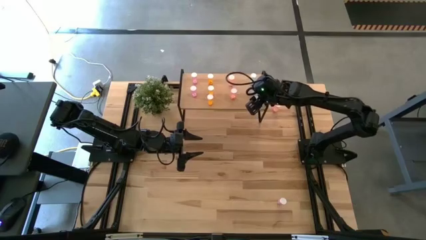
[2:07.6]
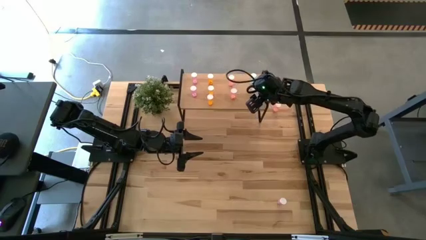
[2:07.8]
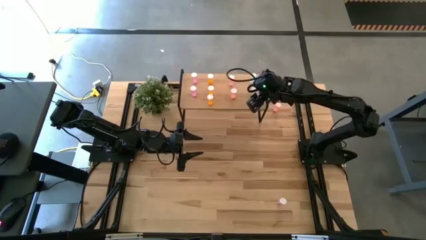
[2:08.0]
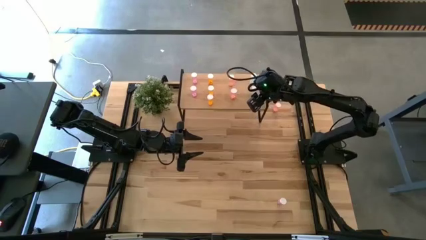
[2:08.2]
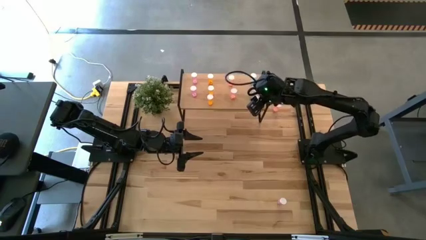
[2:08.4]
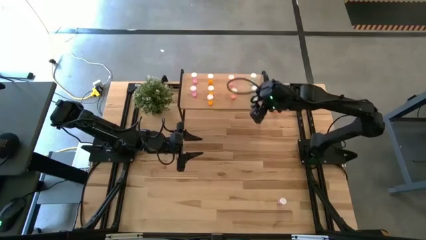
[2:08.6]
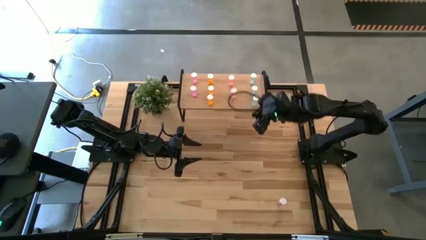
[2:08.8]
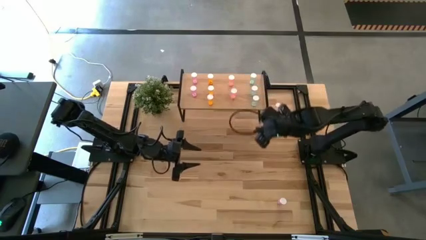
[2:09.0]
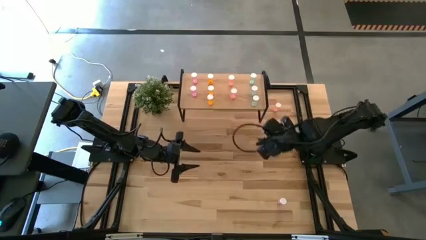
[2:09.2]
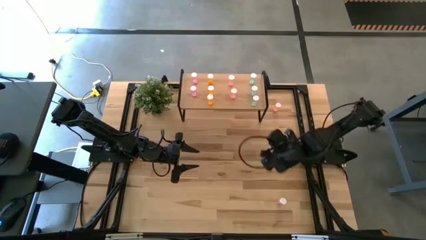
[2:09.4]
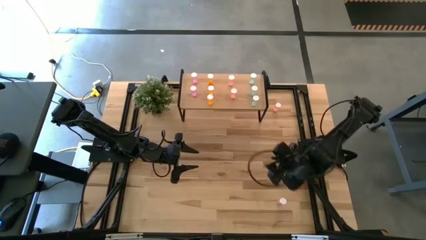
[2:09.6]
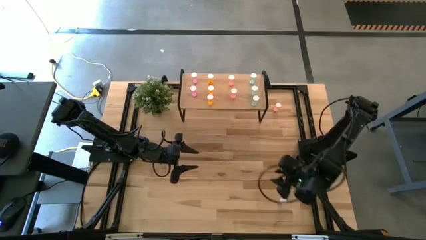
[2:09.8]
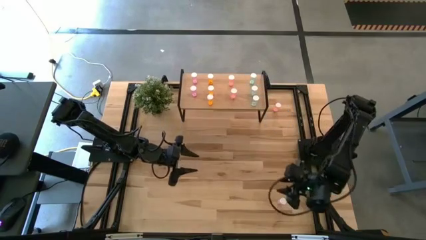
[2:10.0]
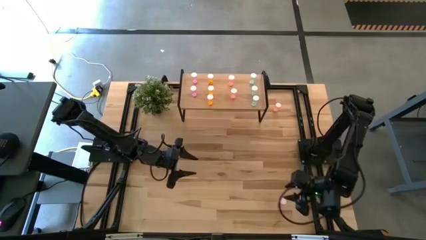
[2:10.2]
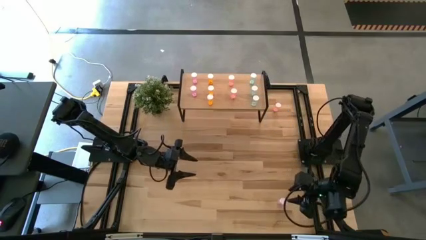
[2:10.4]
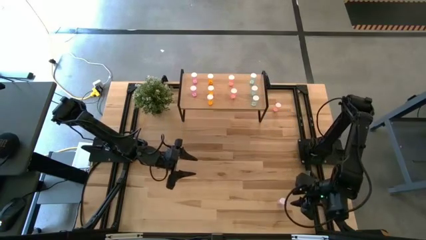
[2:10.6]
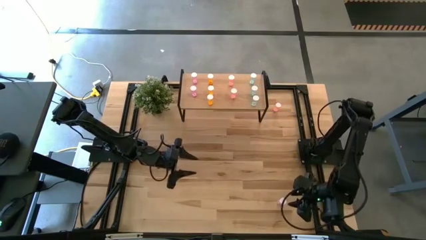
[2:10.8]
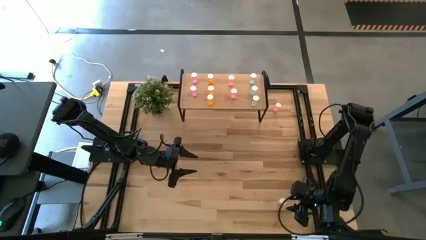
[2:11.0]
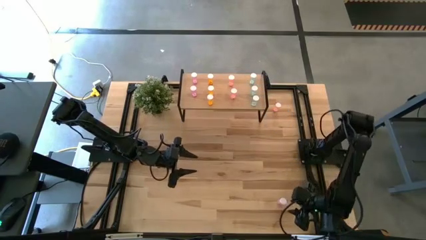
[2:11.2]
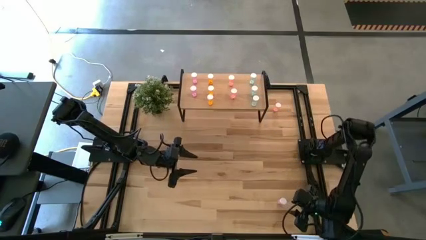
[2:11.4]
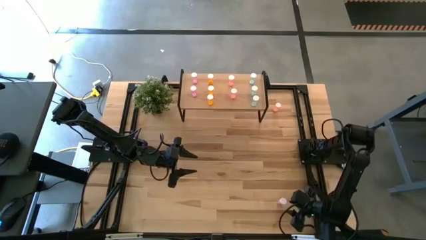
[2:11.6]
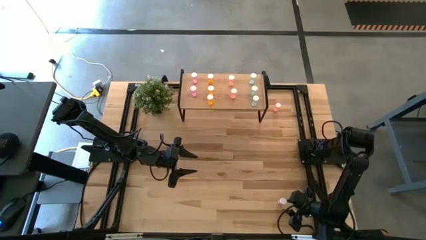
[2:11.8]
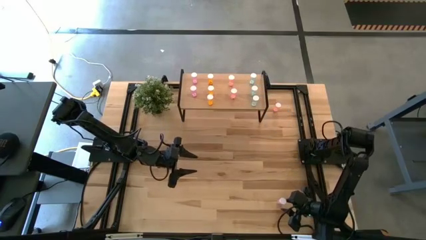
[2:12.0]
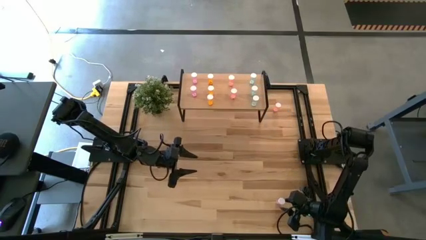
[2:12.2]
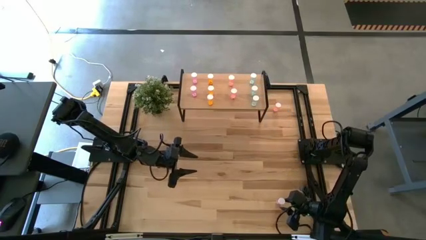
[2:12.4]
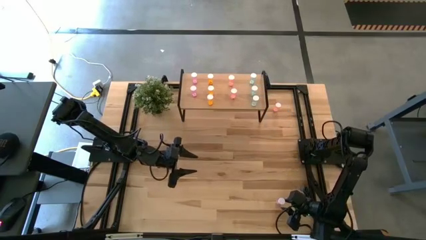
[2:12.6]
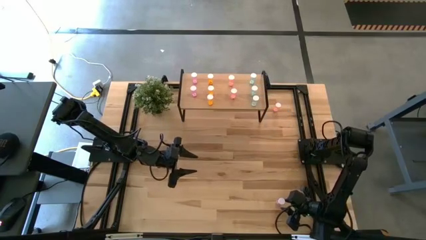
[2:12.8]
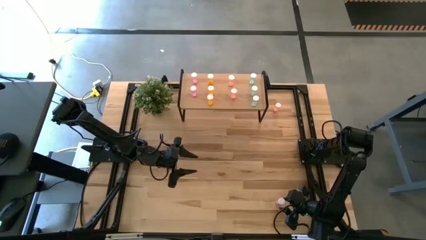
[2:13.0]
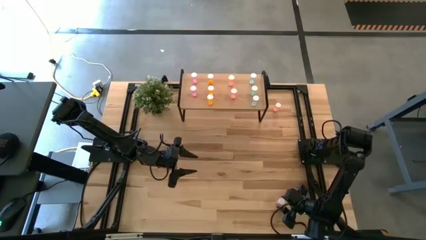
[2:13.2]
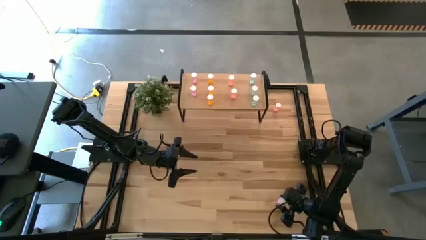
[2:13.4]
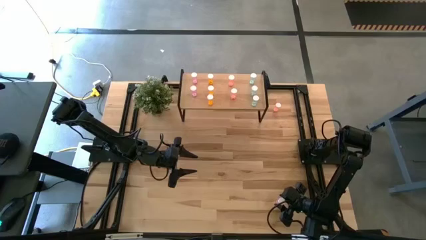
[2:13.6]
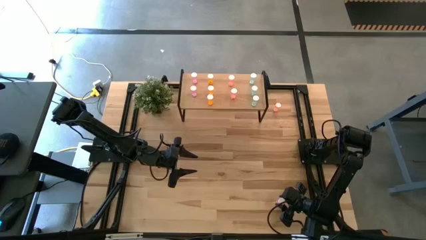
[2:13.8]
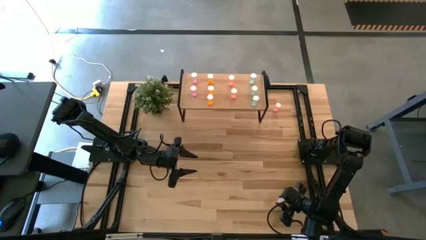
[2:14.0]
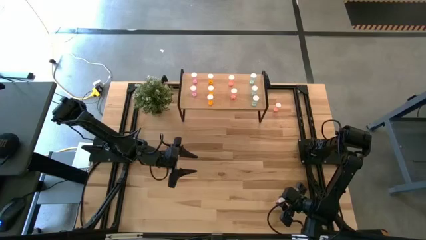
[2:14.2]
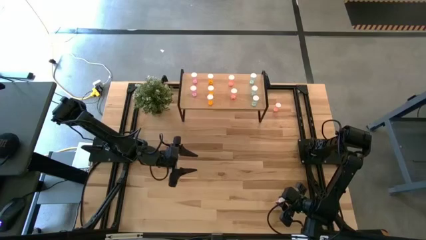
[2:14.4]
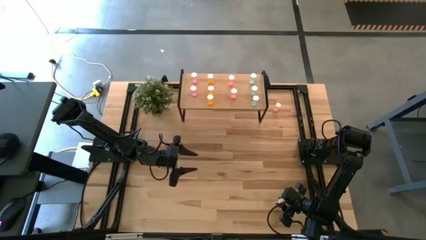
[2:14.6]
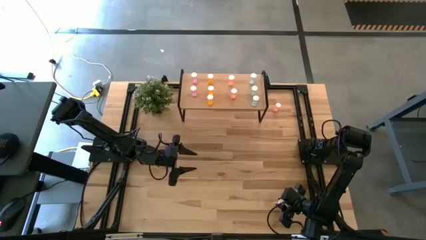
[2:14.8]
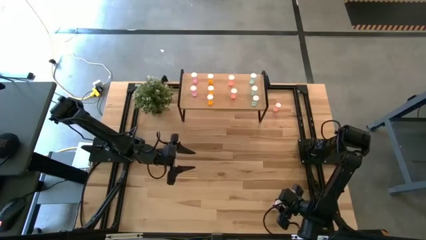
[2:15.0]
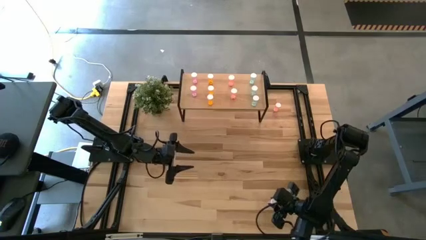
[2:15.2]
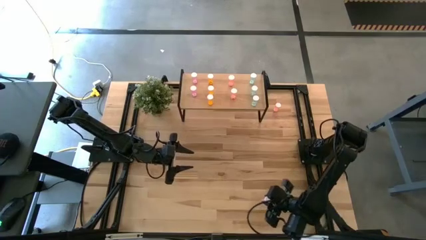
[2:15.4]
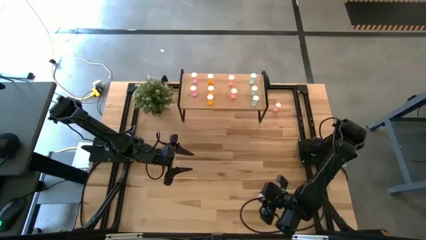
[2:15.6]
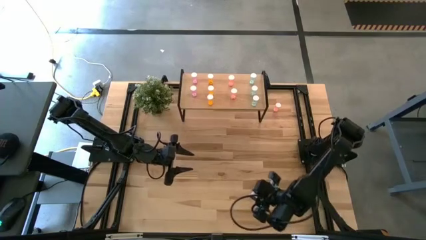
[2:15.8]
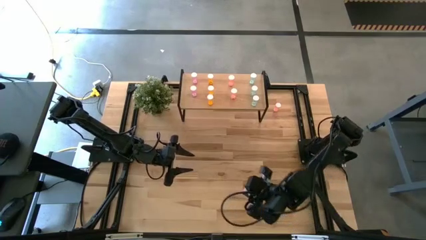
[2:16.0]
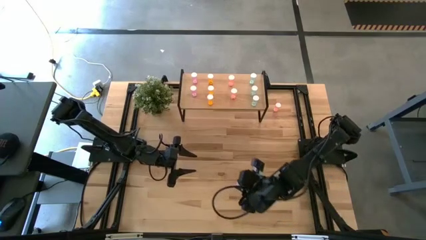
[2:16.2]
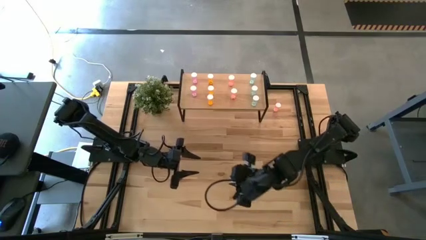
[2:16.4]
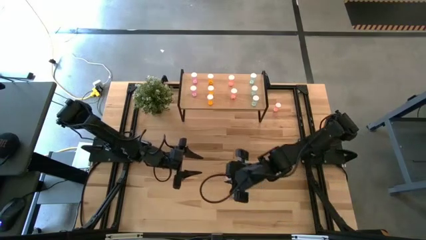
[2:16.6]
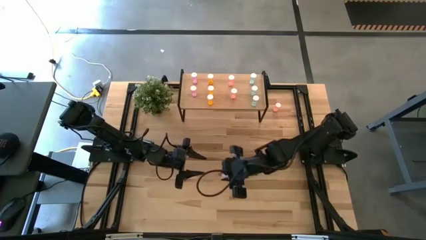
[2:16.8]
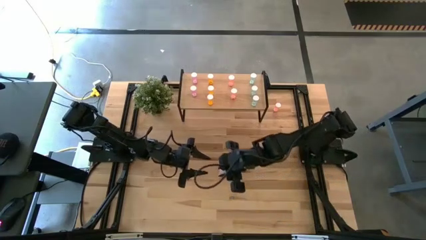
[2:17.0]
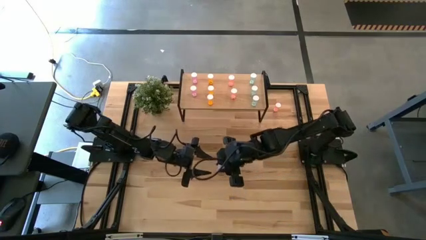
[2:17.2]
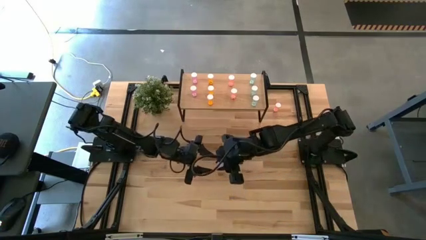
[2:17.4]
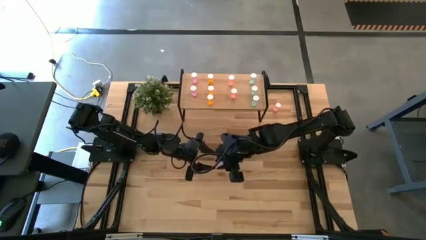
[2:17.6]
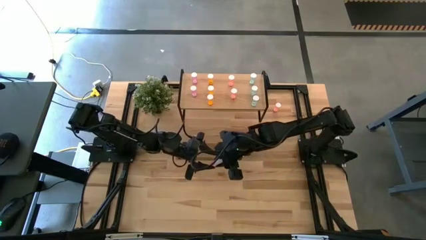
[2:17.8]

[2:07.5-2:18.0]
Task: Pick and place medicine bottles onto shelf by color
Put the violet pill bottle aligned with the other violet pill bottles on the shelf
